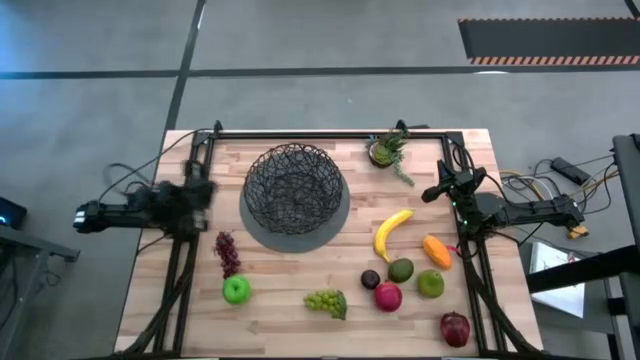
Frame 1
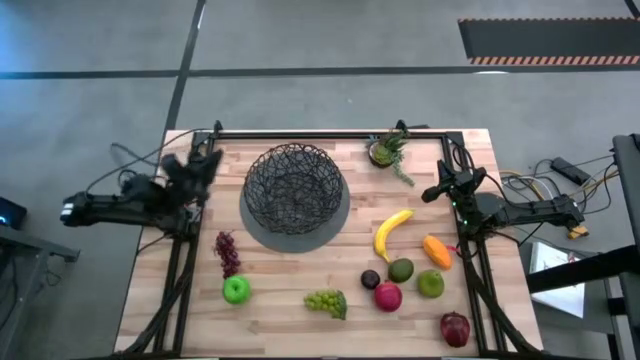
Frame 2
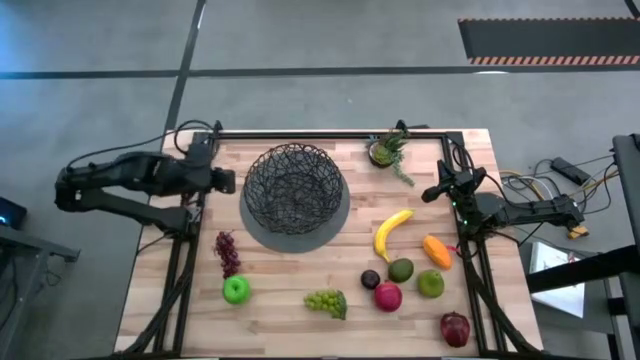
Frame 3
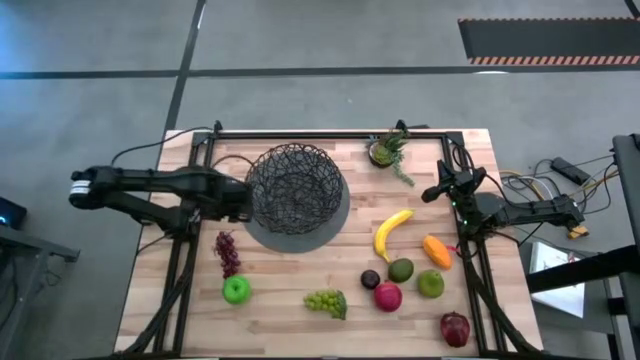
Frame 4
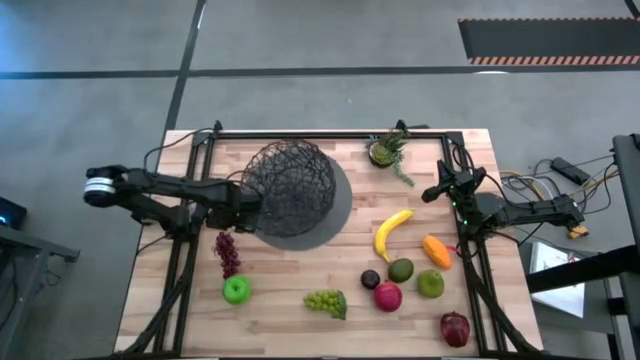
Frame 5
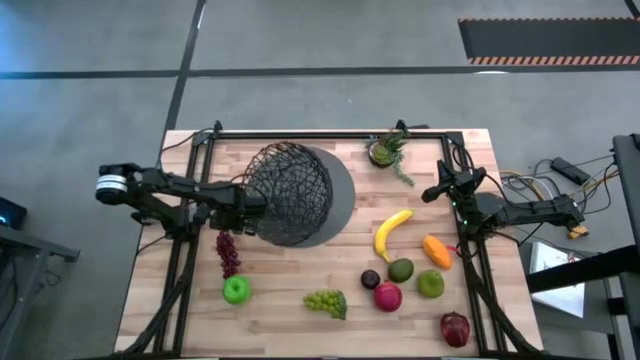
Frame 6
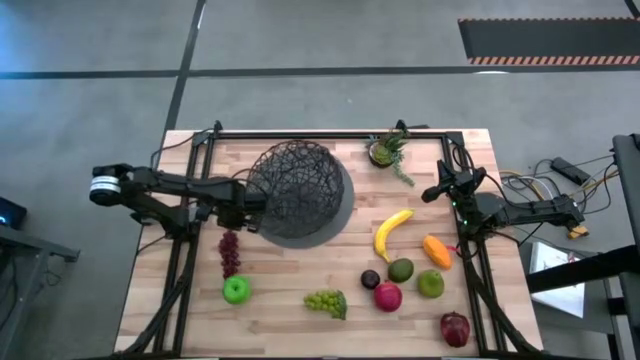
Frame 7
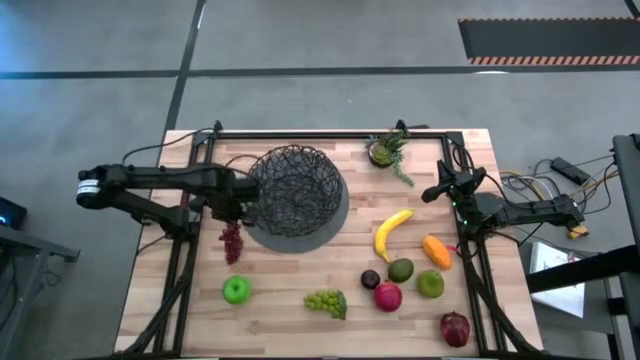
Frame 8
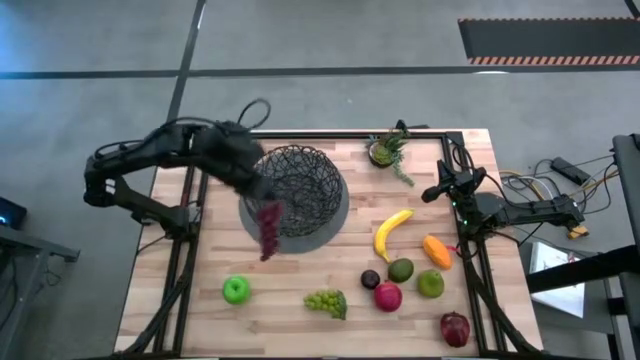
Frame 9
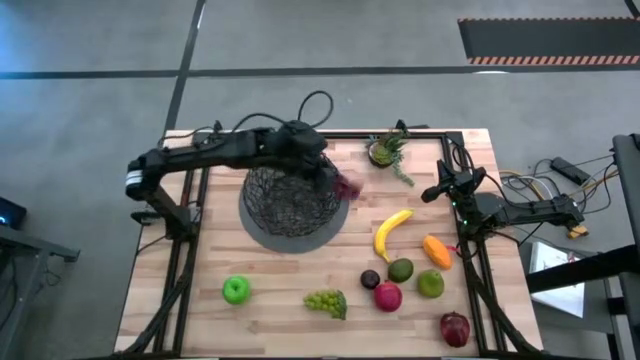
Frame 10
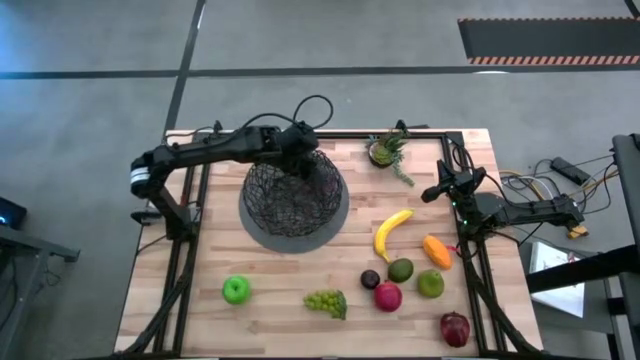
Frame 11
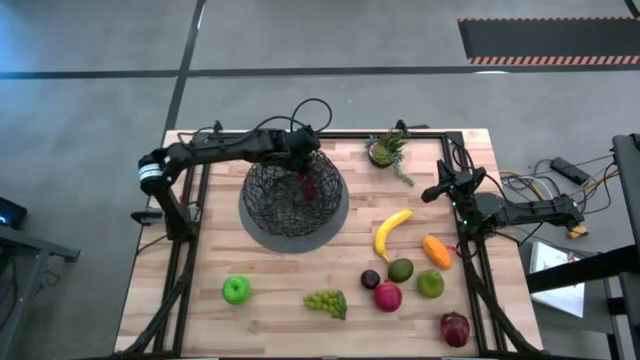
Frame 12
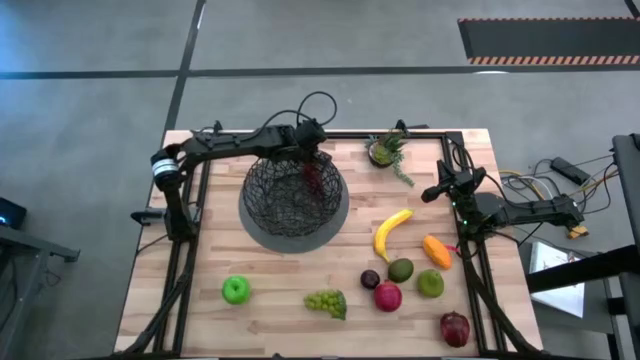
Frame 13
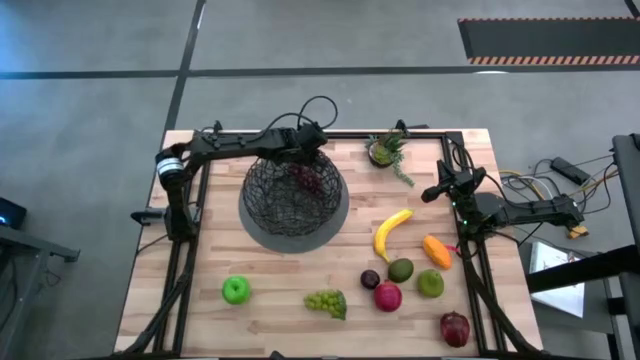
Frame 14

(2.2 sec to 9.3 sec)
Task: Build produce basket
Put the red grapes into the black basket

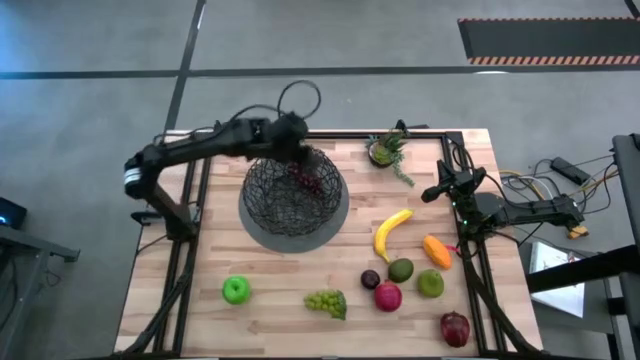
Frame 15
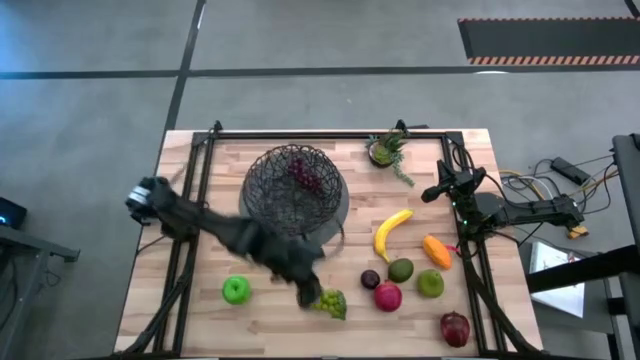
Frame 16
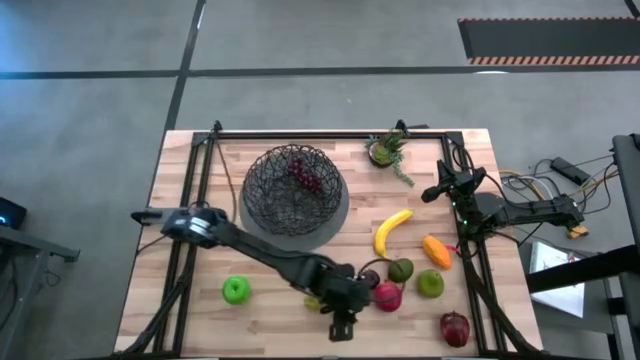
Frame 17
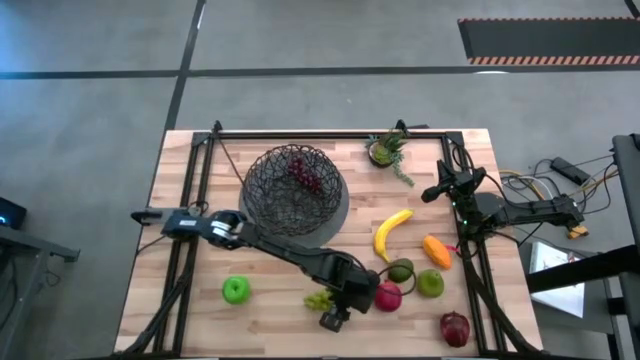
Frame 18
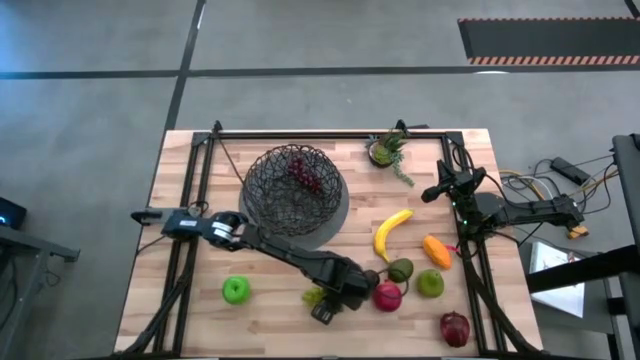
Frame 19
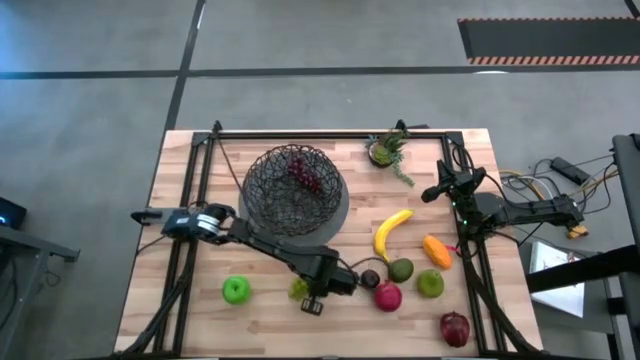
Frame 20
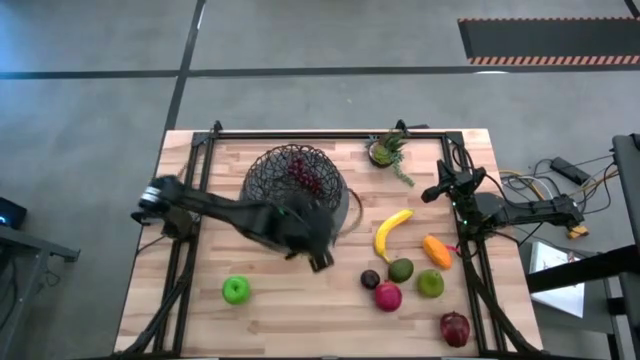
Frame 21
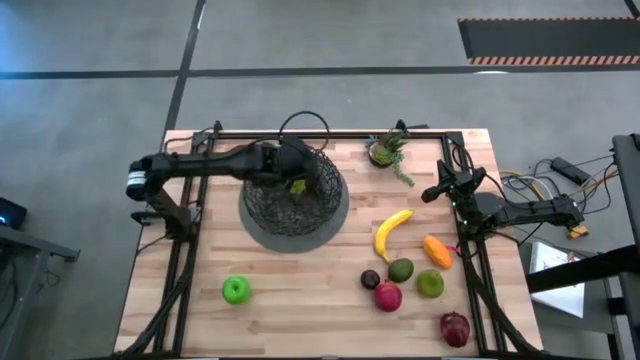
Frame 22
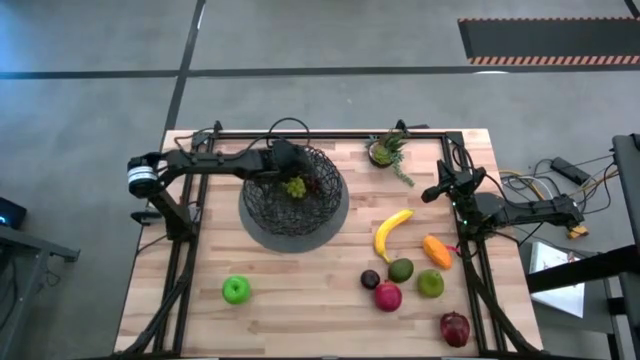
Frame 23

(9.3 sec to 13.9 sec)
Put the green grapes into the basket

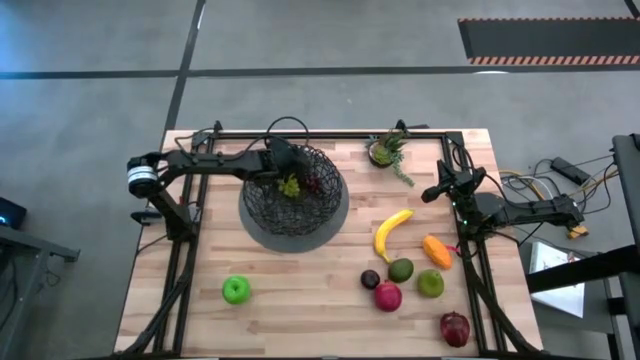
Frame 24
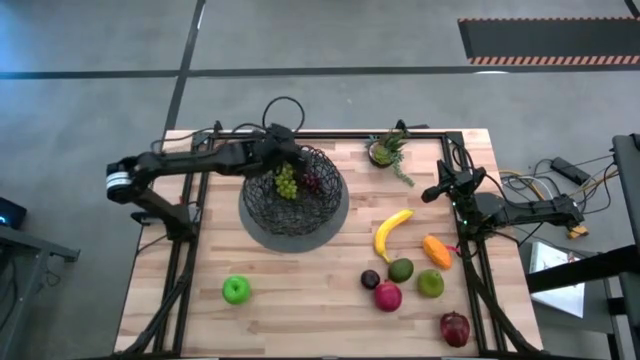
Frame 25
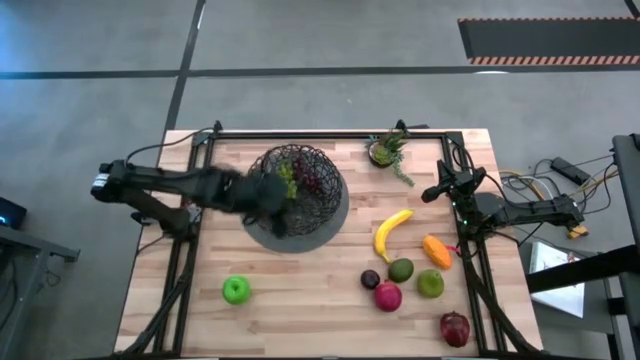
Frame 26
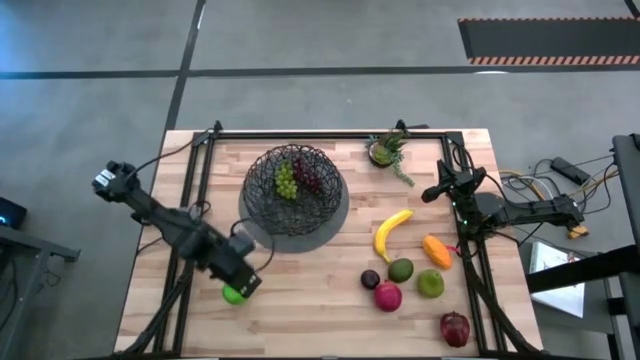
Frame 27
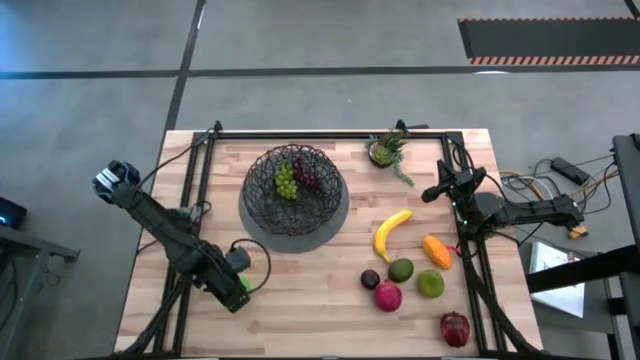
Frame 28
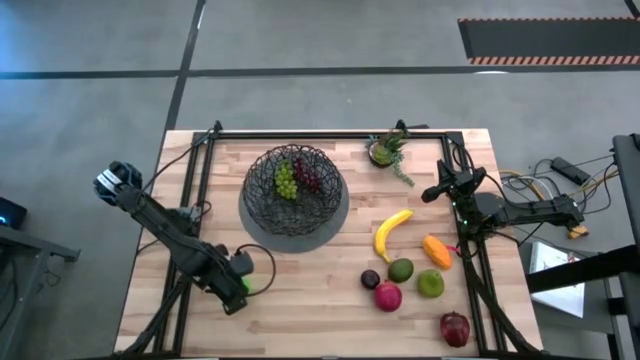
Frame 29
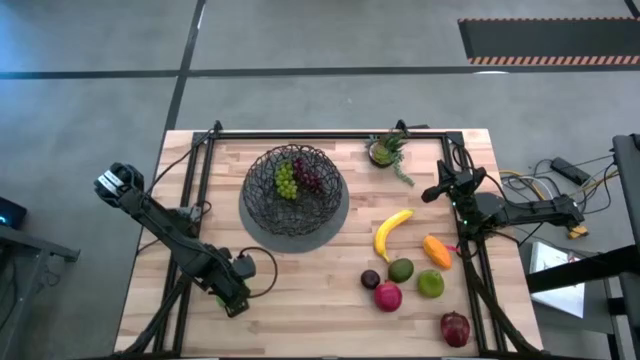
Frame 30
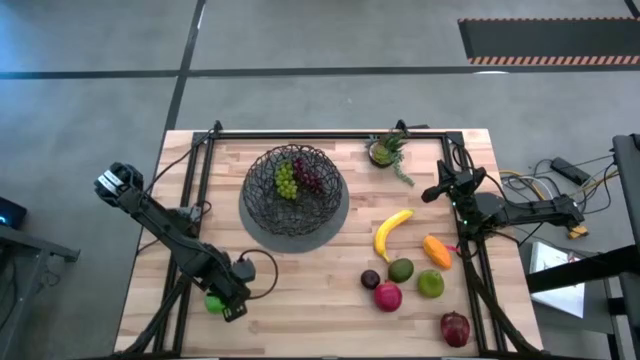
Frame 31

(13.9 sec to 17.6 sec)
Put the apple into the basket

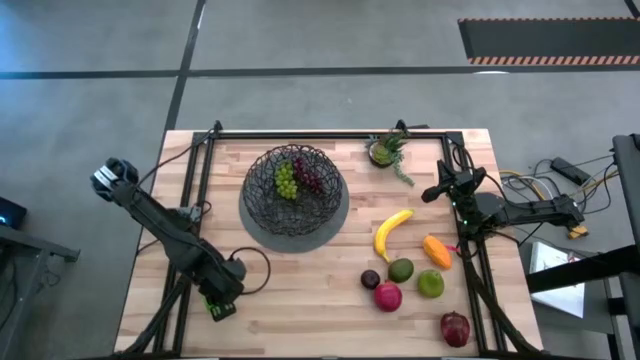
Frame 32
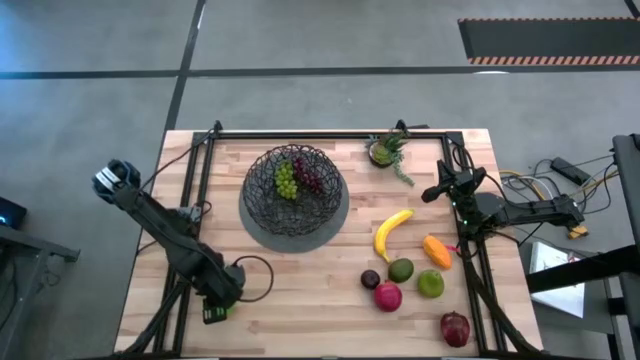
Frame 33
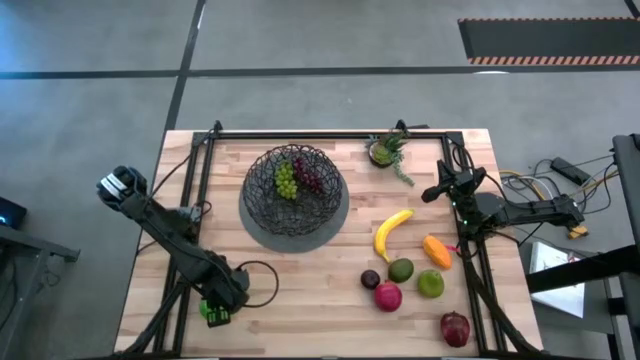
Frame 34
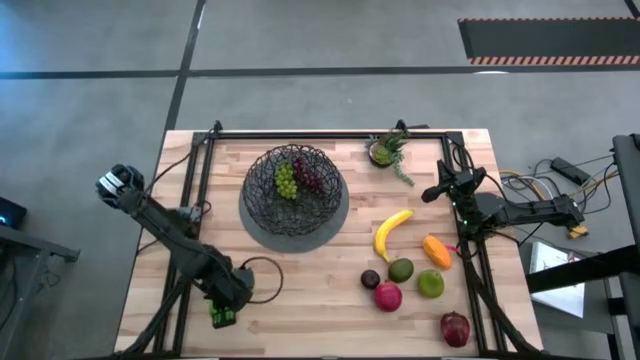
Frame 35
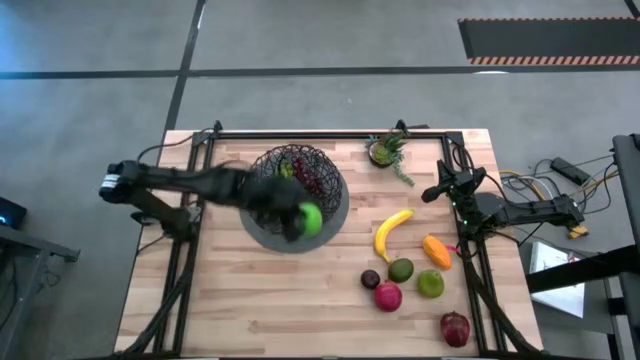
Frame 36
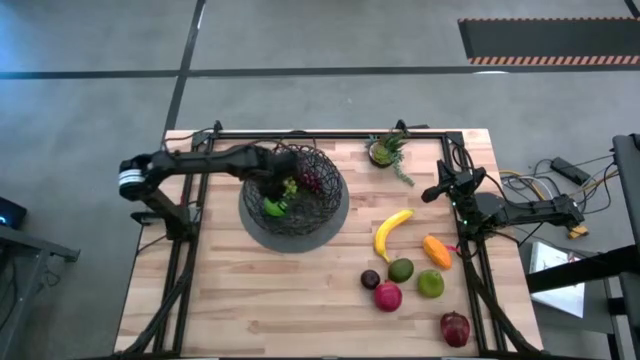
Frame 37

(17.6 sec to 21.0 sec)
Put the apple into the basket

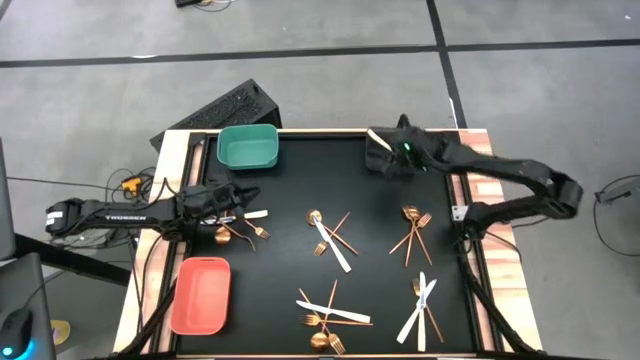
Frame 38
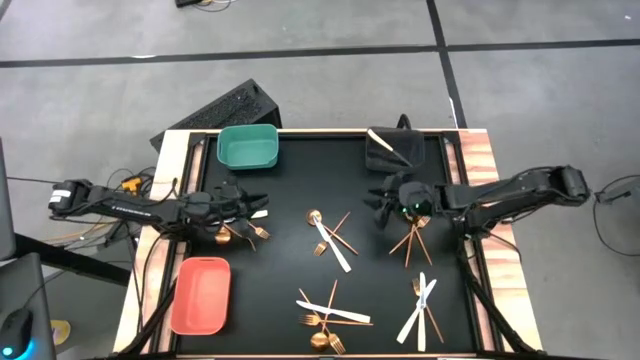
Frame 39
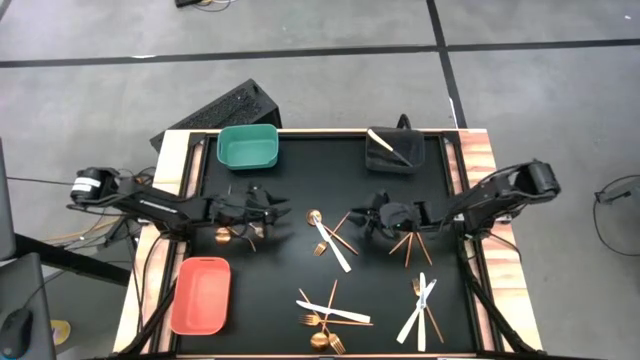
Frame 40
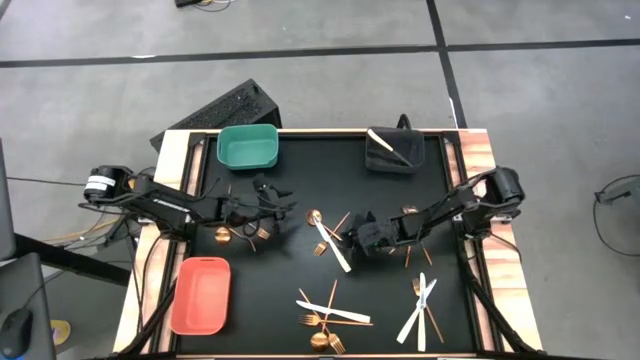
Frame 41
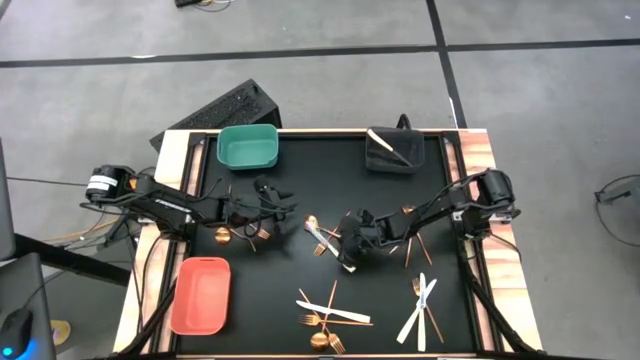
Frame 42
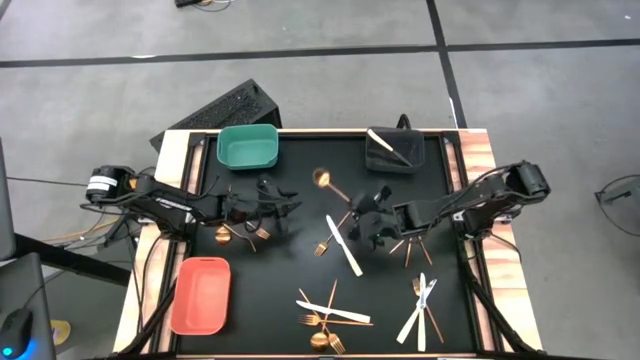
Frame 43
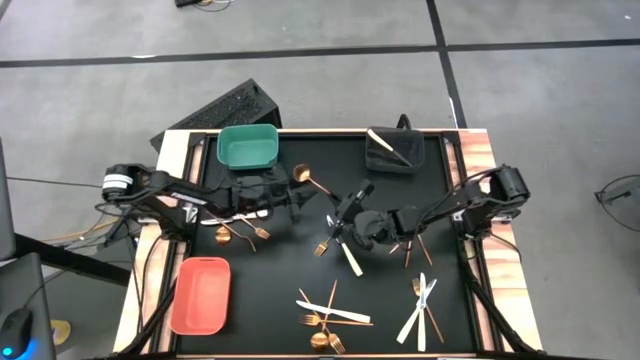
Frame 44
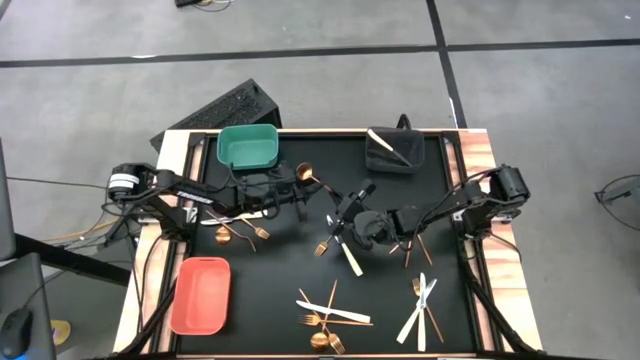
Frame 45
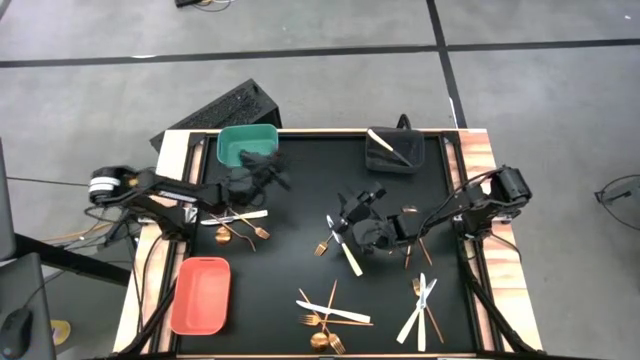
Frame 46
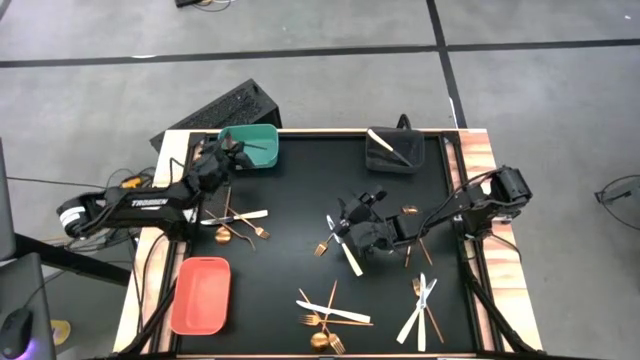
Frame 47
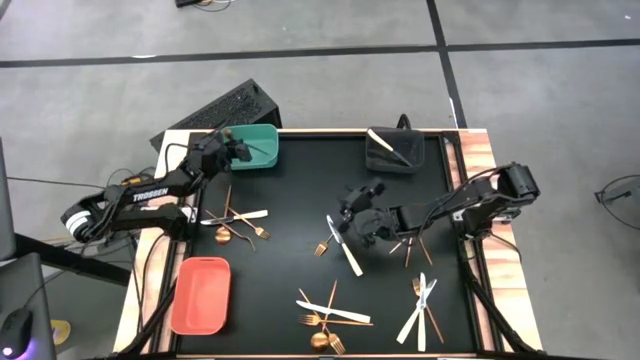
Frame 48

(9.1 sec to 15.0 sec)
Task: Sort silverware by color (type)
Put the gold spoon into the green bin
